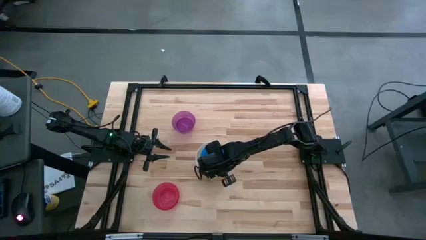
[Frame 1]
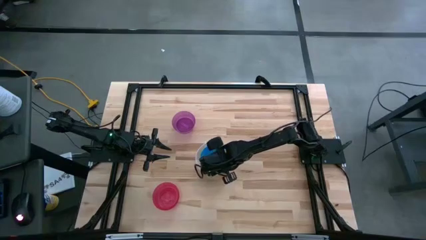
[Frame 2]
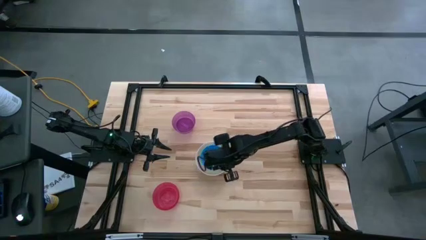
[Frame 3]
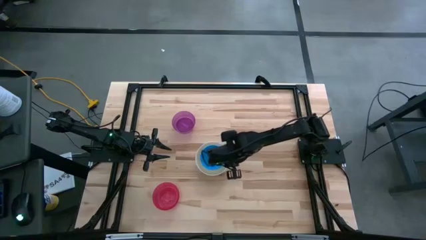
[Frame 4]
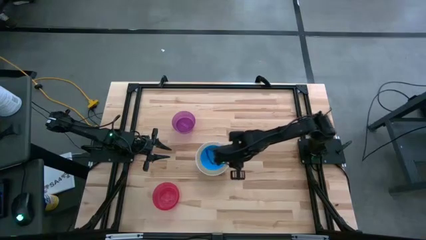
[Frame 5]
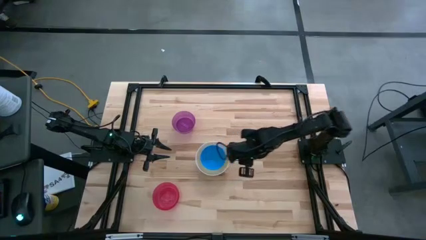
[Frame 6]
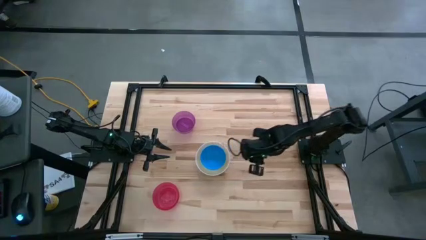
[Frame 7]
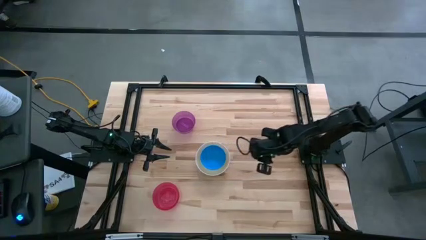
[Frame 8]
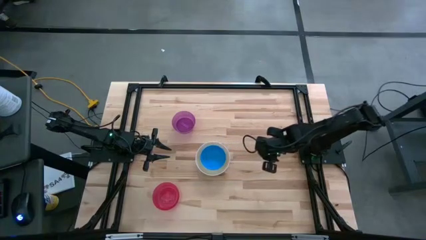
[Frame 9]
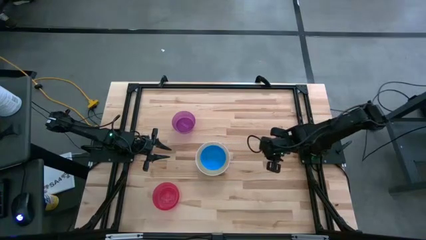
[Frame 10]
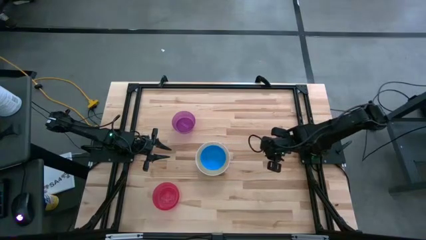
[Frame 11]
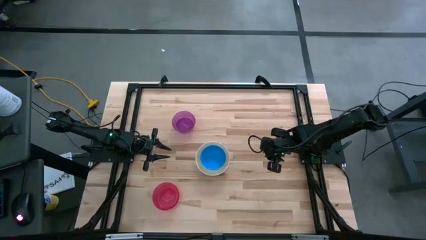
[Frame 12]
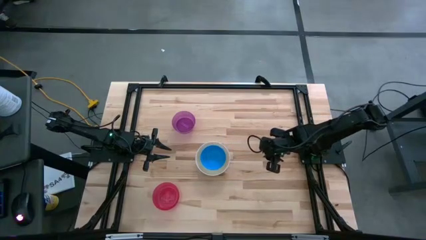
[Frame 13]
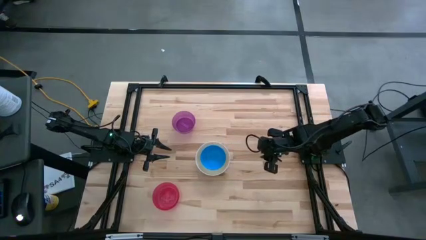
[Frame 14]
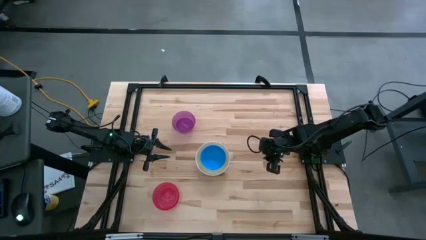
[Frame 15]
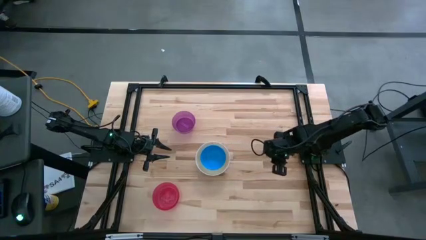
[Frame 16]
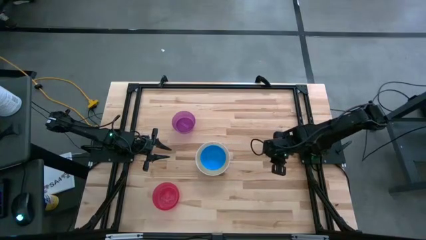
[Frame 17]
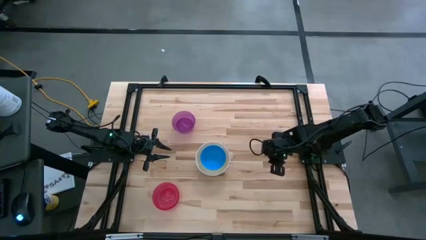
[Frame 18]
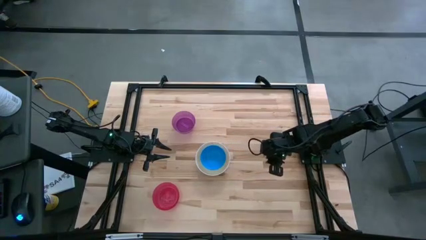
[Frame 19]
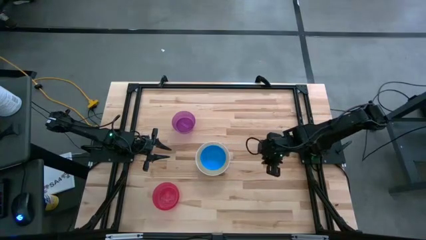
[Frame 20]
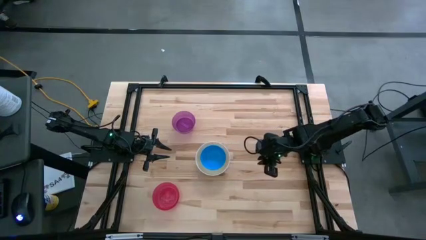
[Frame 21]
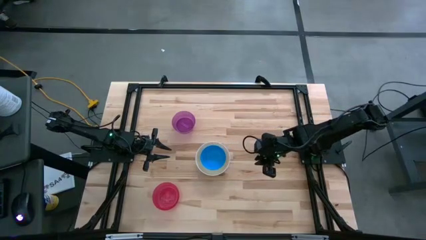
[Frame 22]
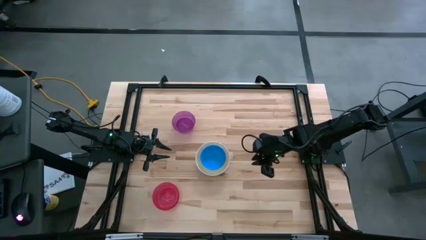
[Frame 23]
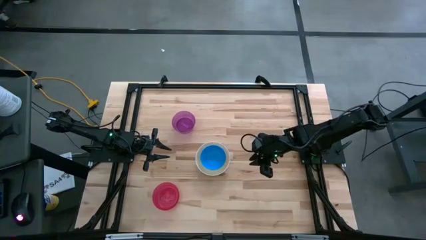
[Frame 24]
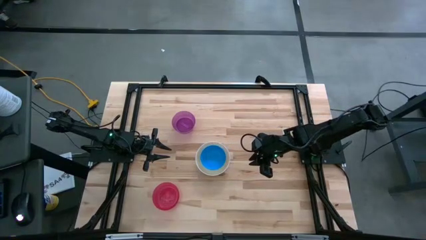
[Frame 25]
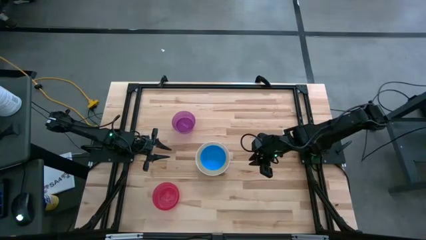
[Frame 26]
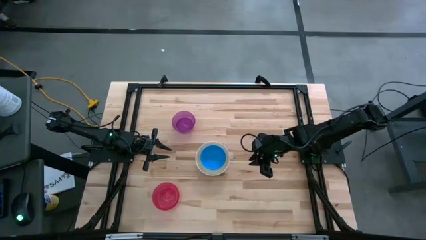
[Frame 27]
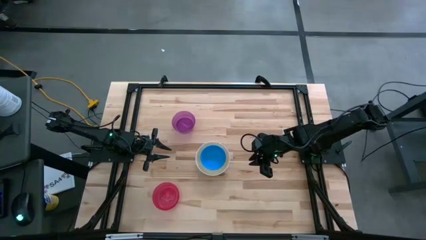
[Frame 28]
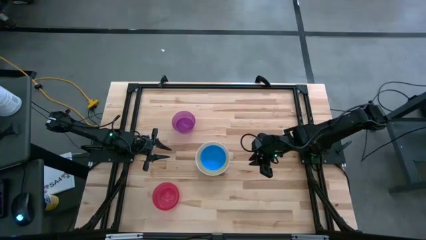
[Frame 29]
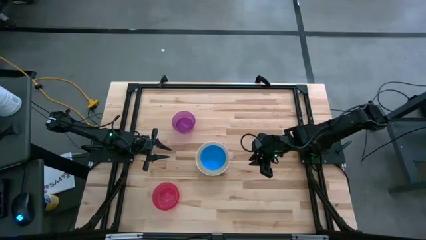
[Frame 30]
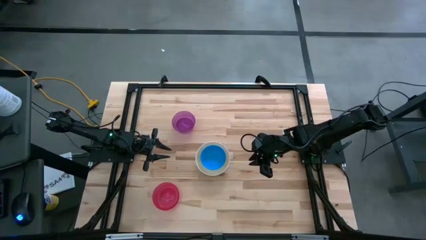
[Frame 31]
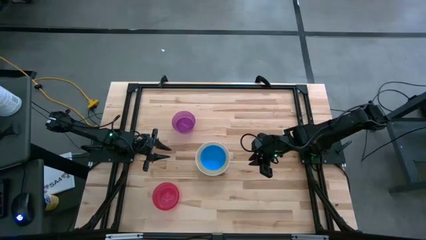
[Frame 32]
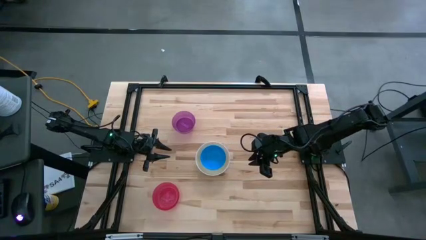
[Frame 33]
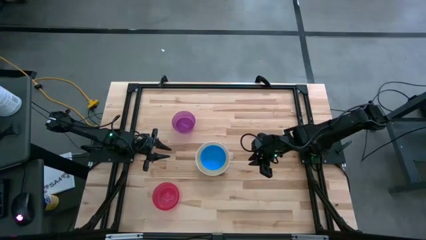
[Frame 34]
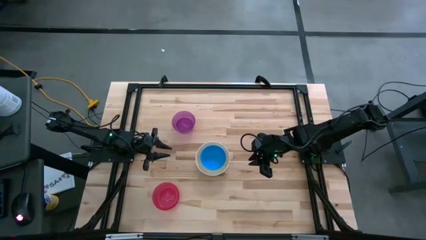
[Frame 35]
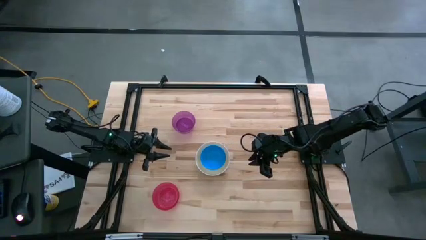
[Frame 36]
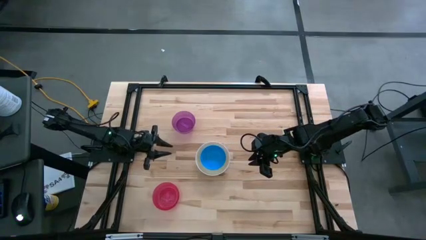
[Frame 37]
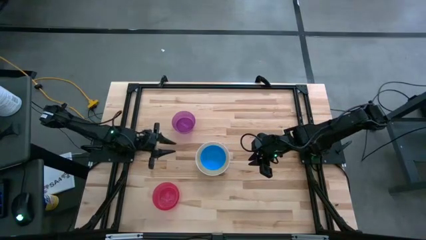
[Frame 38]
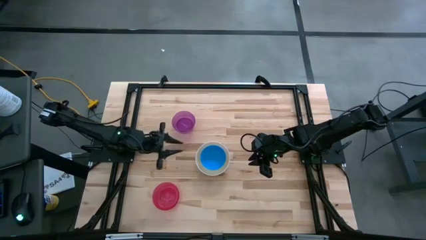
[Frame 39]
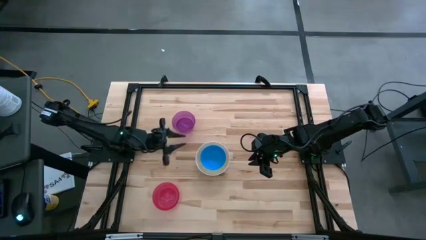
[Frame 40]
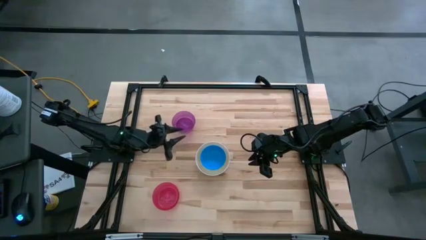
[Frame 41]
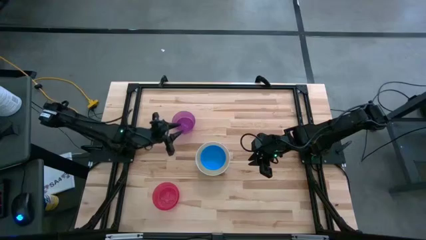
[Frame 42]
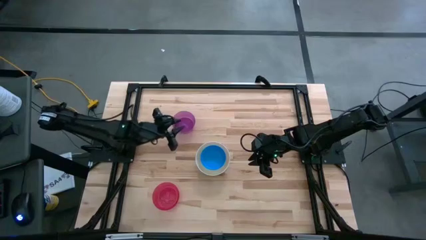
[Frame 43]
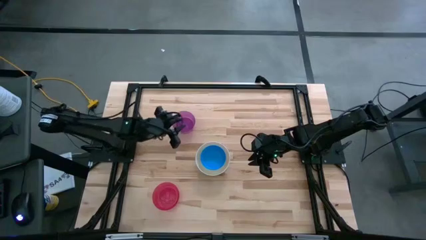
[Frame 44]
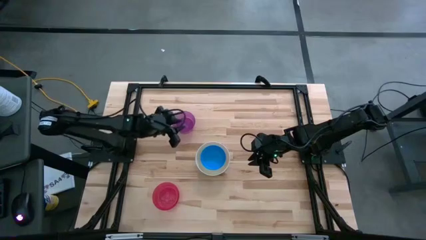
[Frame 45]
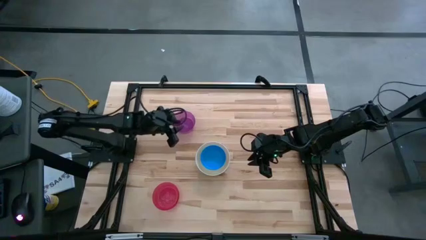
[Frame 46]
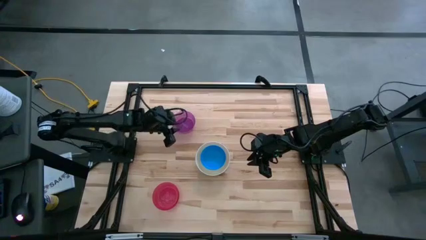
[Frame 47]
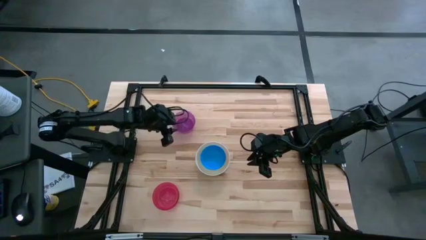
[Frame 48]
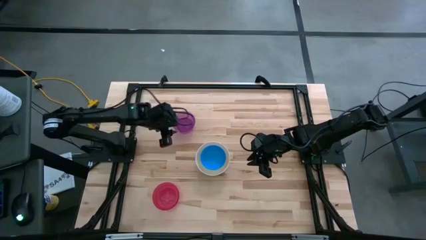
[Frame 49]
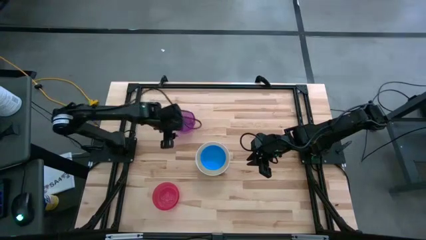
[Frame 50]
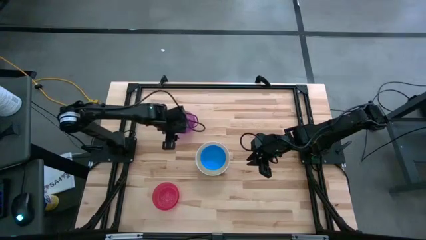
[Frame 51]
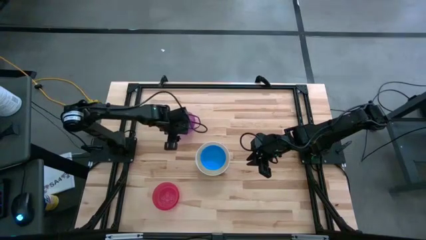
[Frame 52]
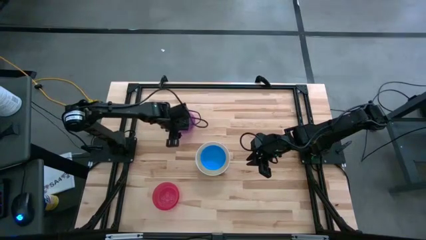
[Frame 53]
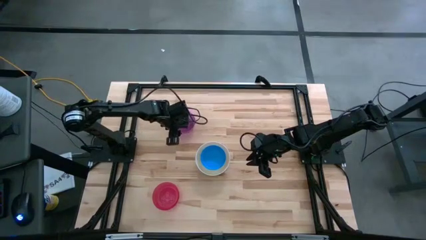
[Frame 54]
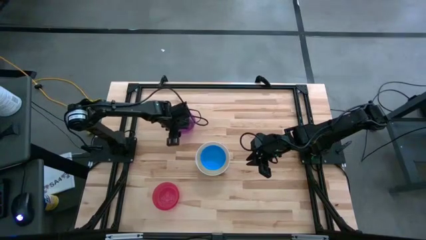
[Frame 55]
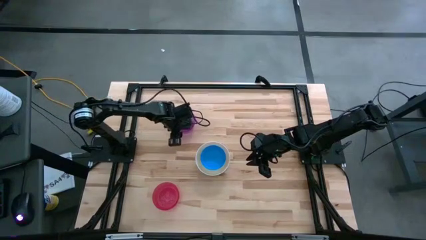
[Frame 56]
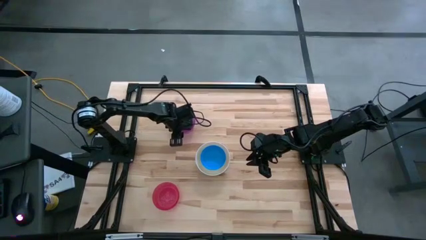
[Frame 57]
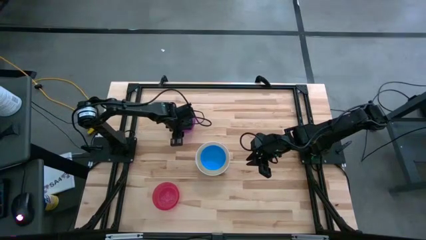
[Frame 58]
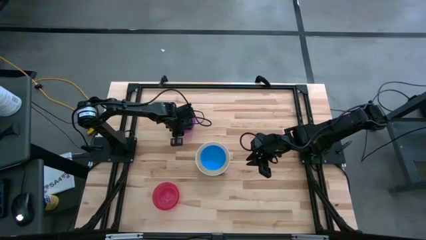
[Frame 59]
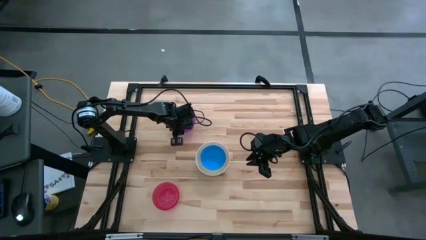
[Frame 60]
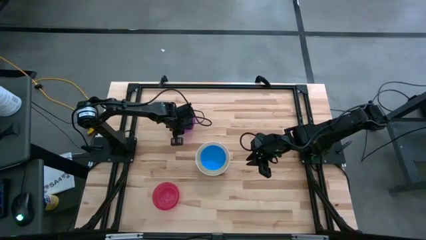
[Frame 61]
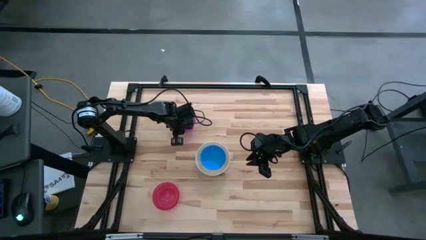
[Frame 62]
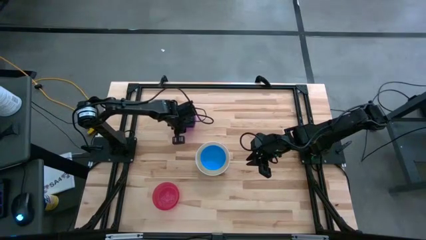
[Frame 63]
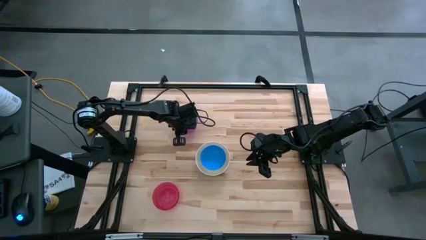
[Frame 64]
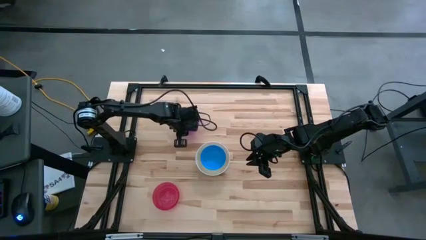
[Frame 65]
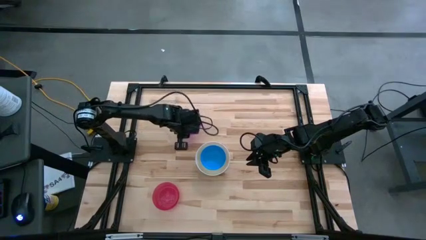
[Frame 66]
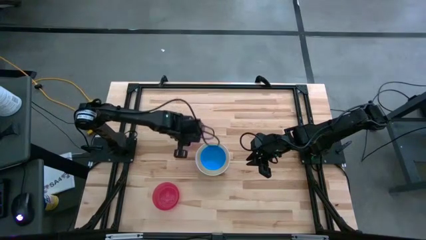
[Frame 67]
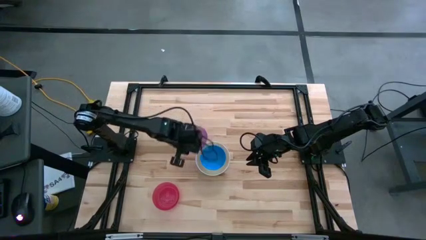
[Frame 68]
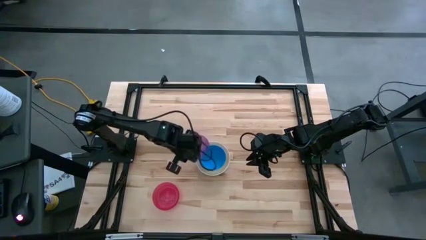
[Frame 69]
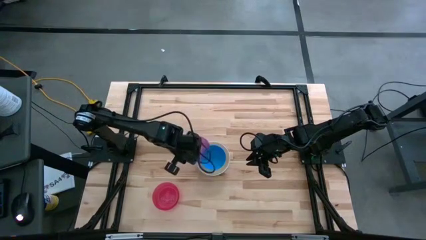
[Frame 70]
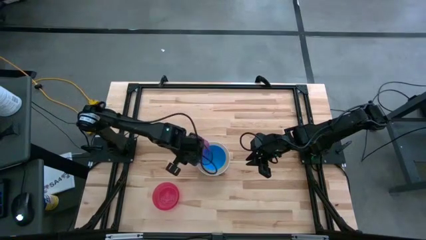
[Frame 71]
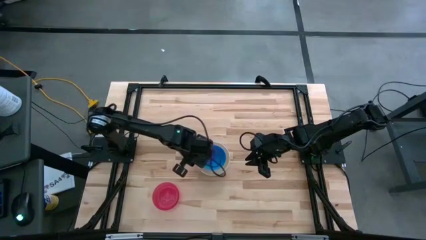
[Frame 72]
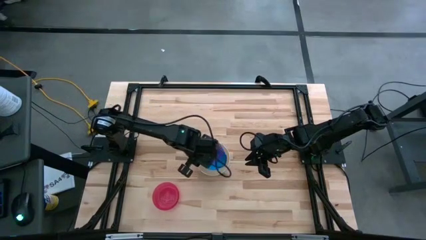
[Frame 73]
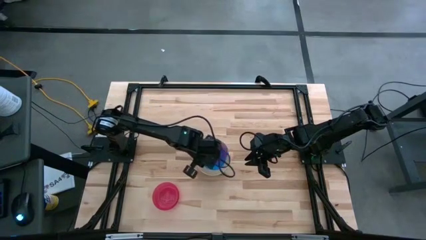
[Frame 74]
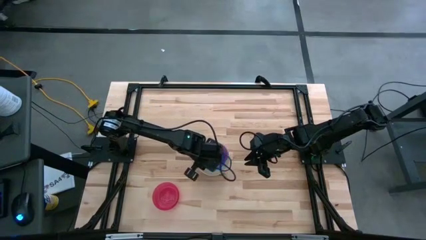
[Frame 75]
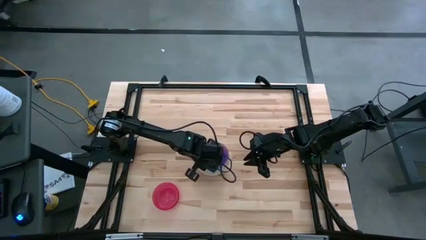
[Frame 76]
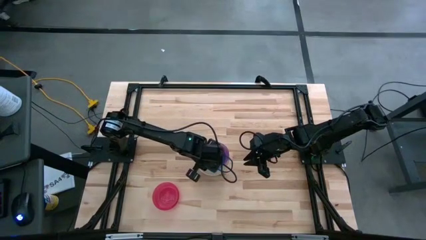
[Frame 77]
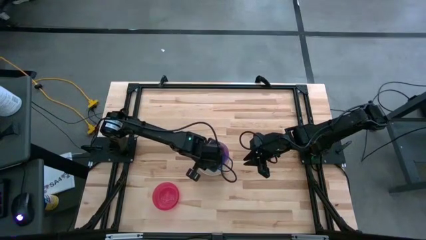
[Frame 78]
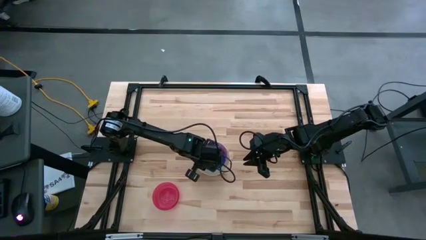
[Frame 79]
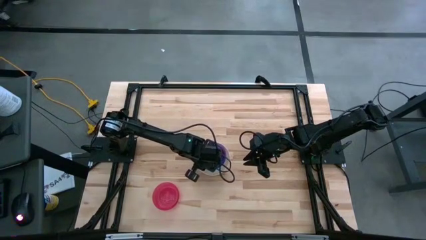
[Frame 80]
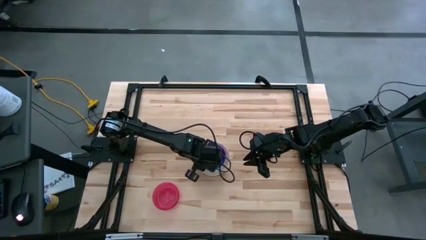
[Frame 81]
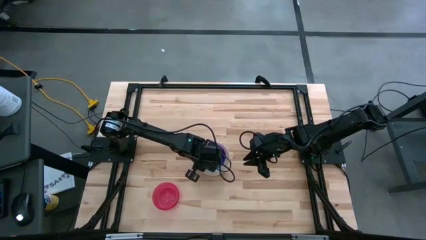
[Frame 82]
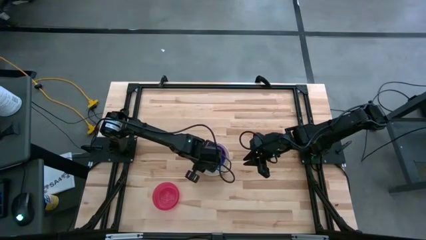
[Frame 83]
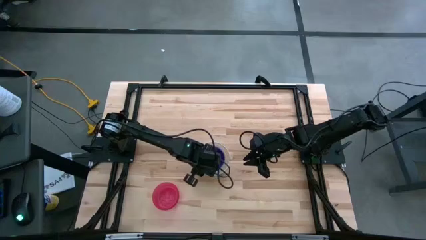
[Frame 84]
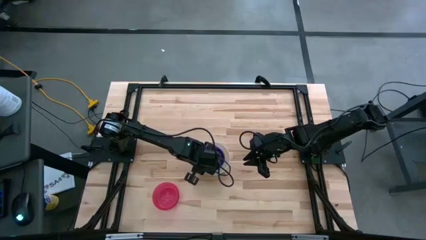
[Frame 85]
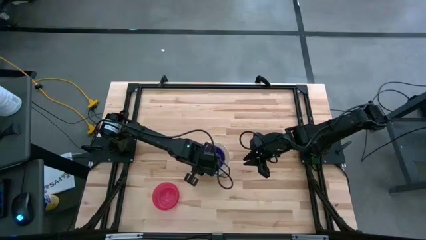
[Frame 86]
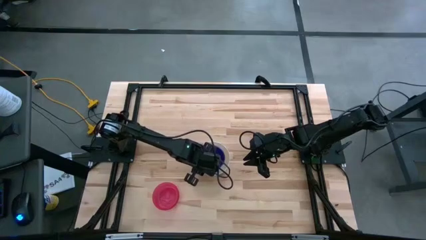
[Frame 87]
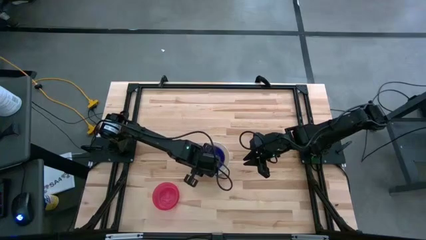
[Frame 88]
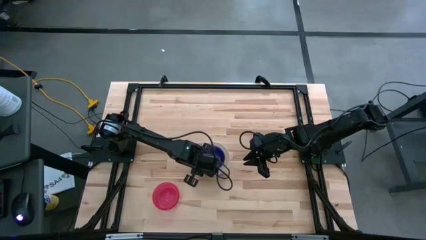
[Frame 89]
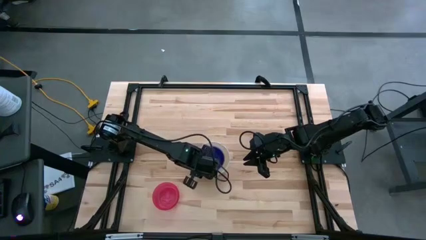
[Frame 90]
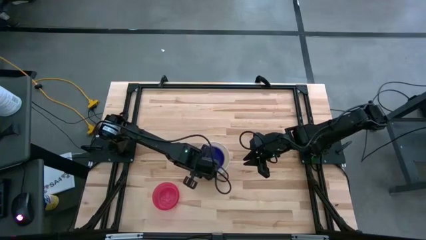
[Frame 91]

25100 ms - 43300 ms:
Stack the violet bowl on the blue bowl
